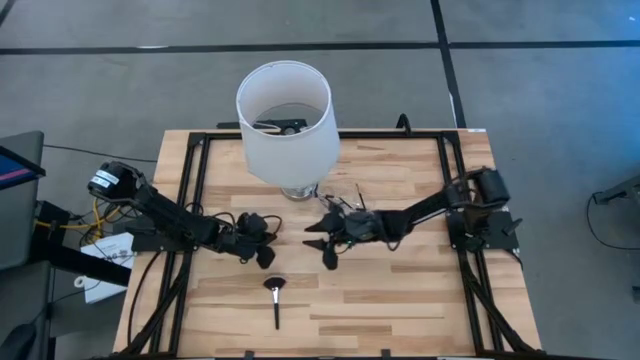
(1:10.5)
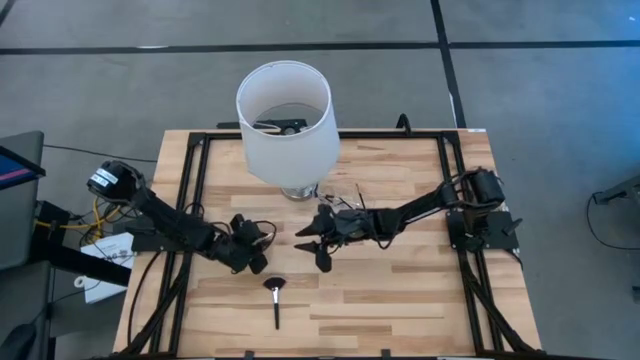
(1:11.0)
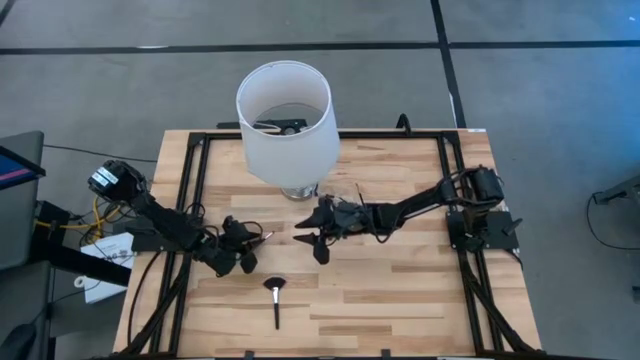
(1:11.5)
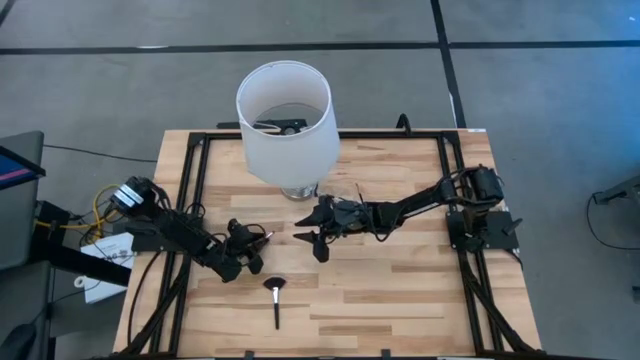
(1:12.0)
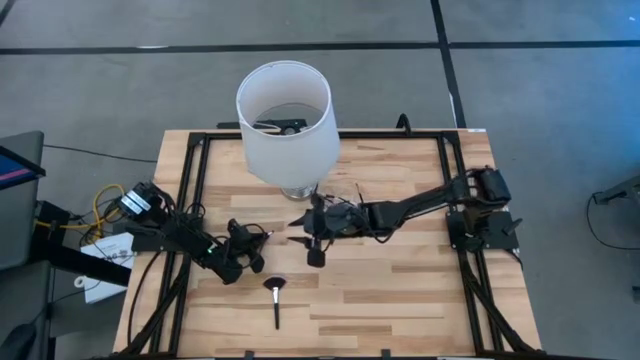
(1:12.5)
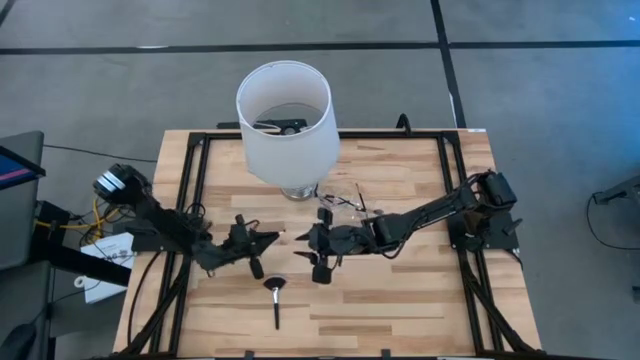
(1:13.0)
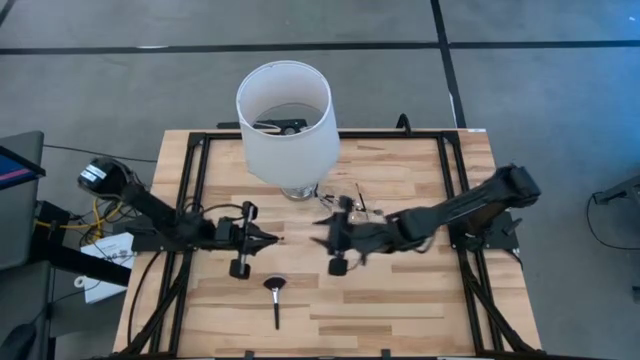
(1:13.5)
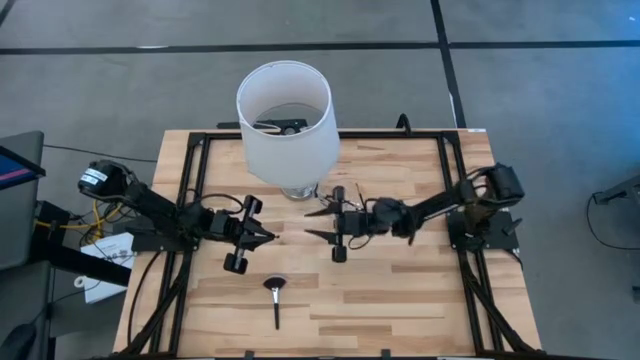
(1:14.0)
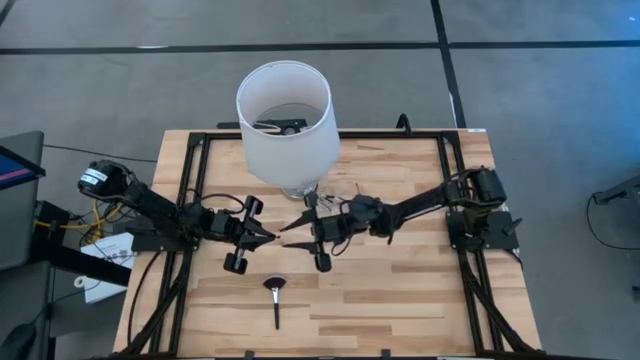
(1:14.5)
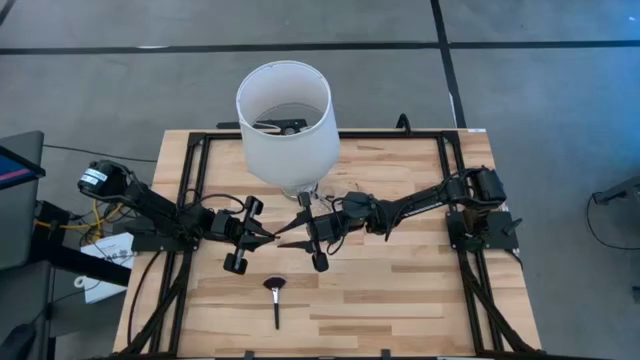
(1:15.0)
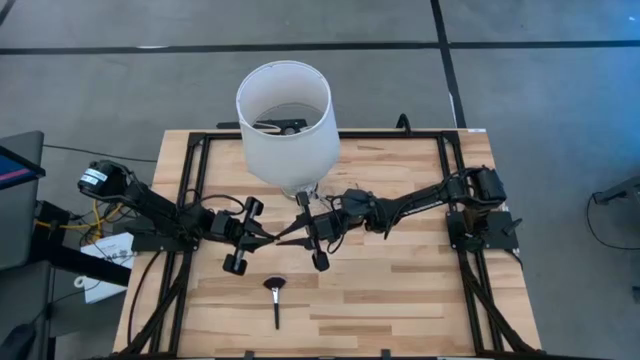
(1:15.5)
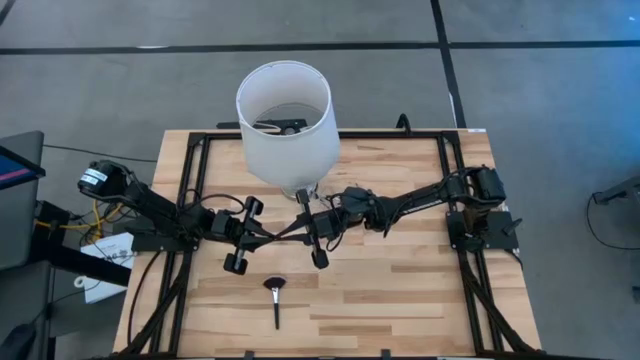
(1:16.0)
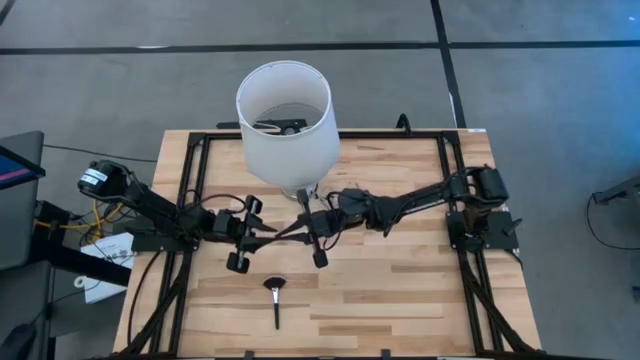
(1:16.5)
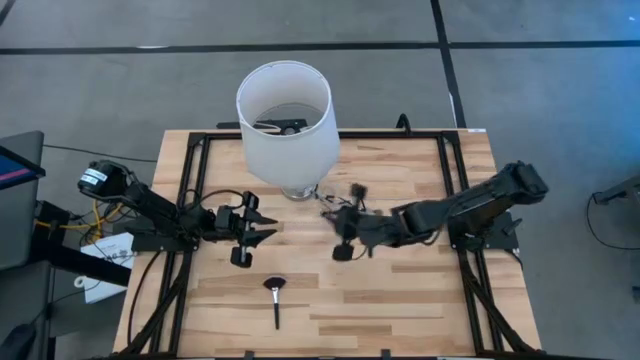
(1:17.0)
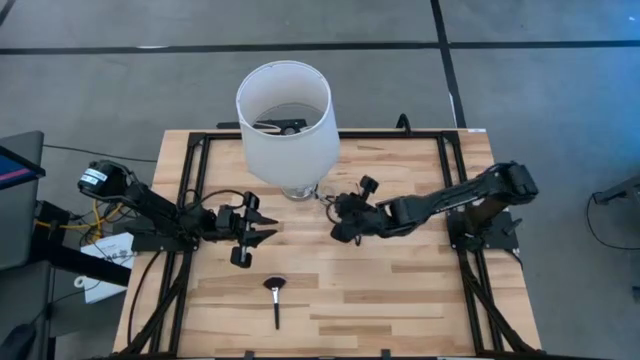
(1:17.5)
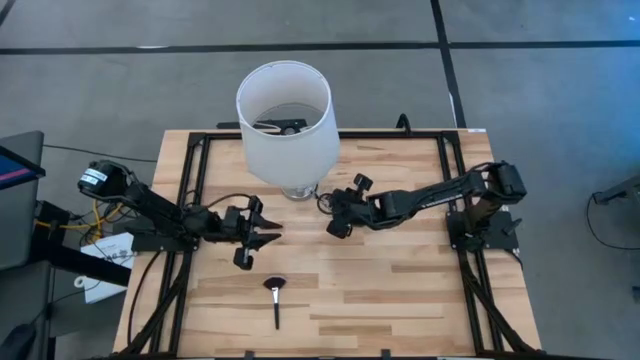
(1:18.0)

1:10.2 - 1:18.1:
Task: Put items in baskets/containers
Put the black eyeshadow brush into the transparent organizer

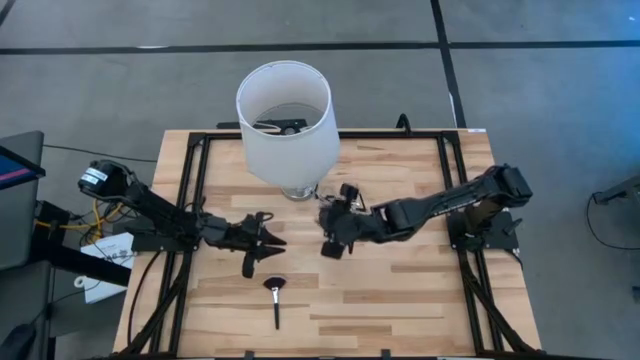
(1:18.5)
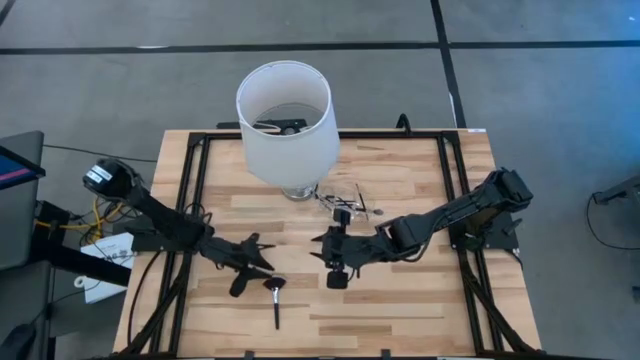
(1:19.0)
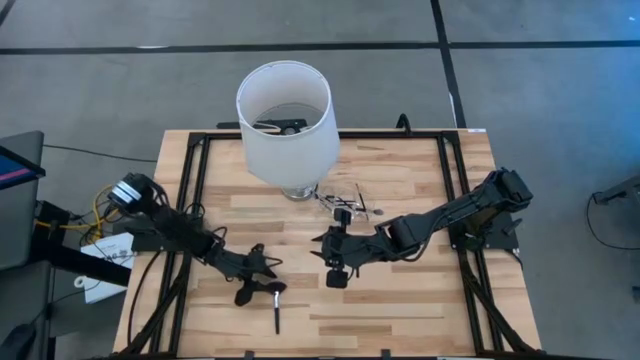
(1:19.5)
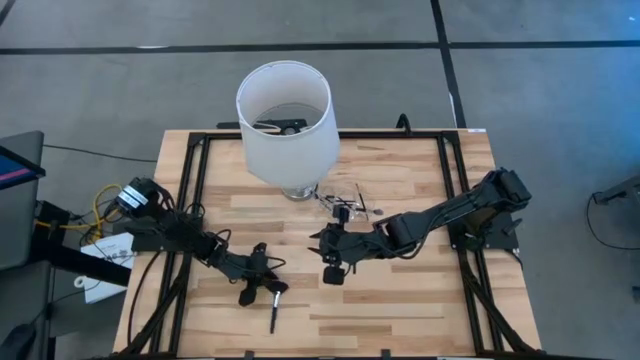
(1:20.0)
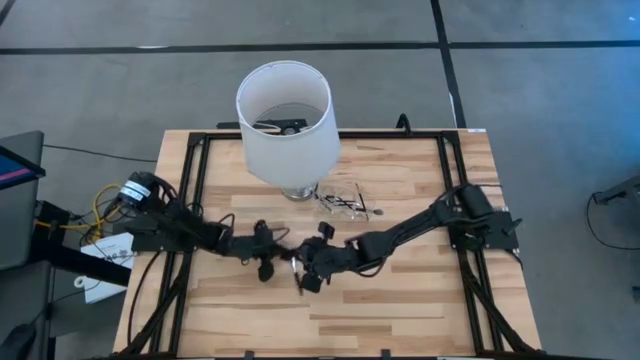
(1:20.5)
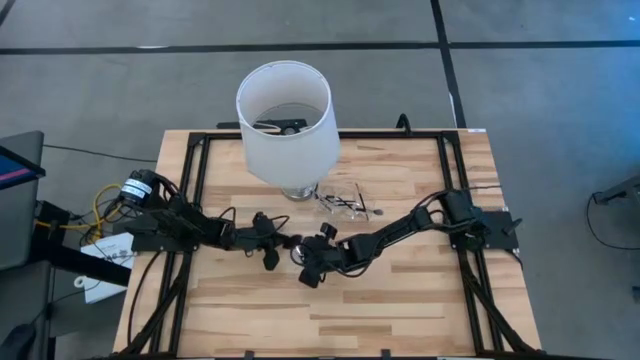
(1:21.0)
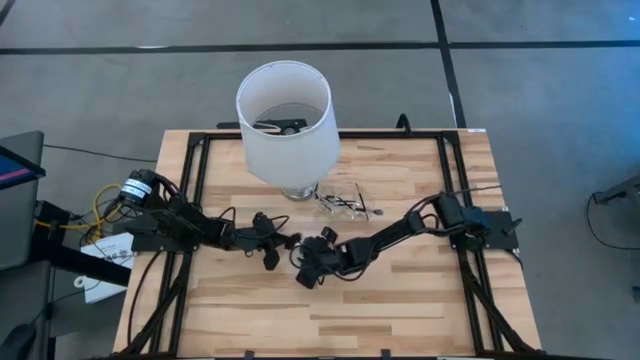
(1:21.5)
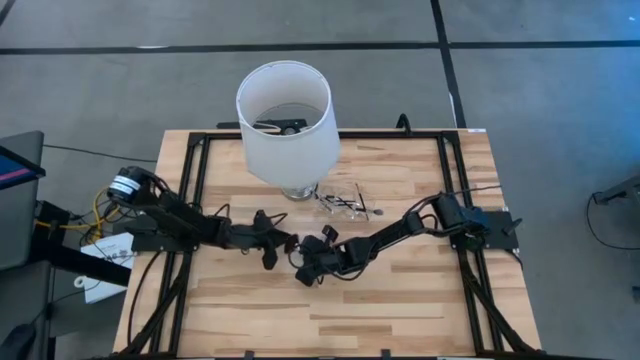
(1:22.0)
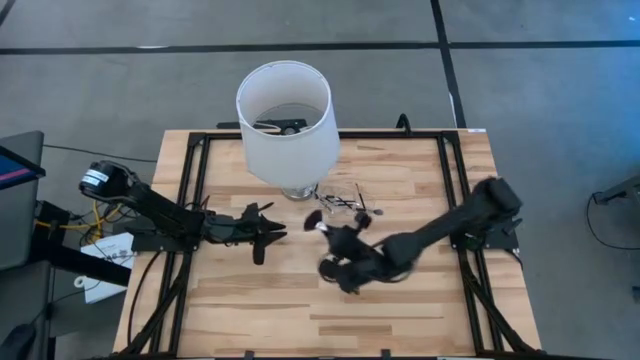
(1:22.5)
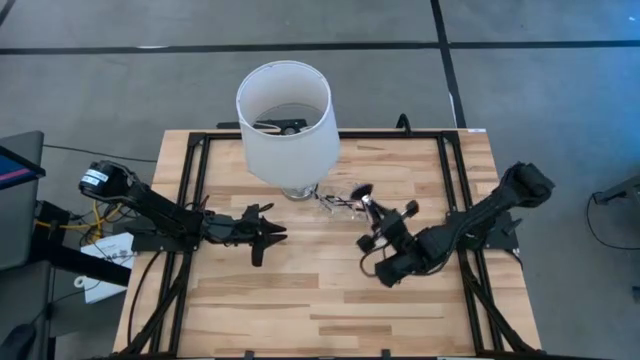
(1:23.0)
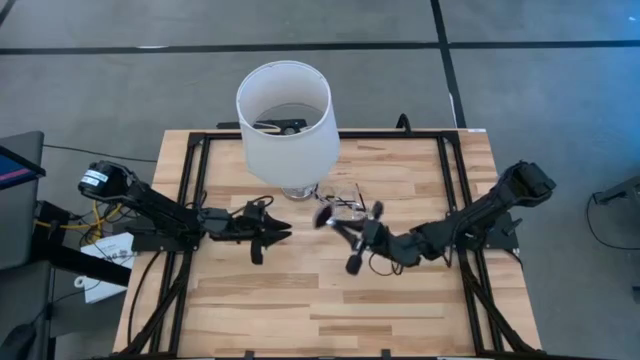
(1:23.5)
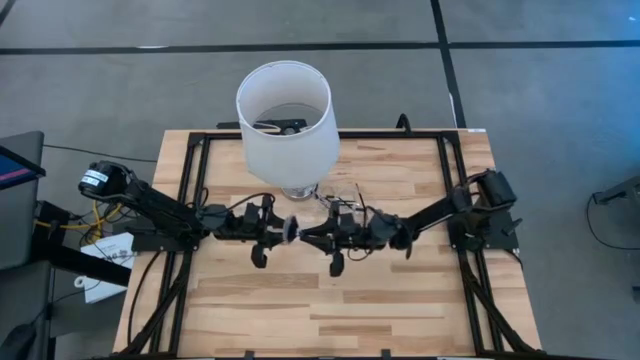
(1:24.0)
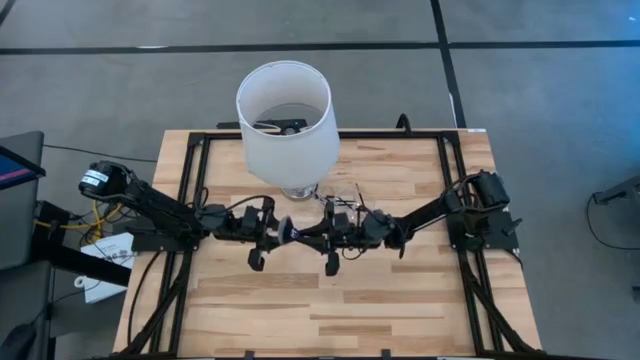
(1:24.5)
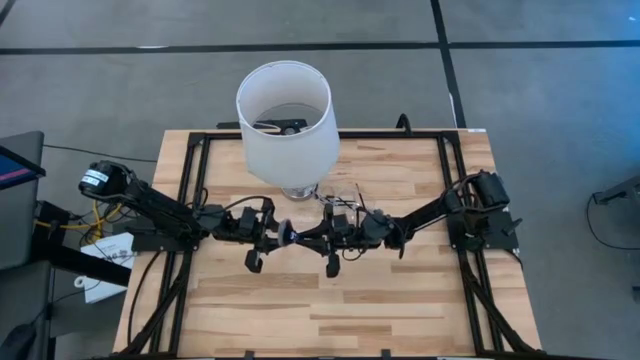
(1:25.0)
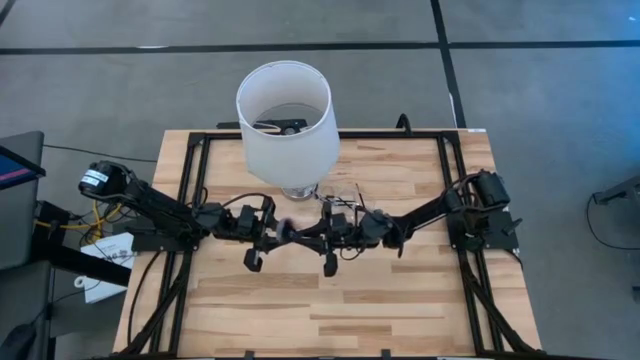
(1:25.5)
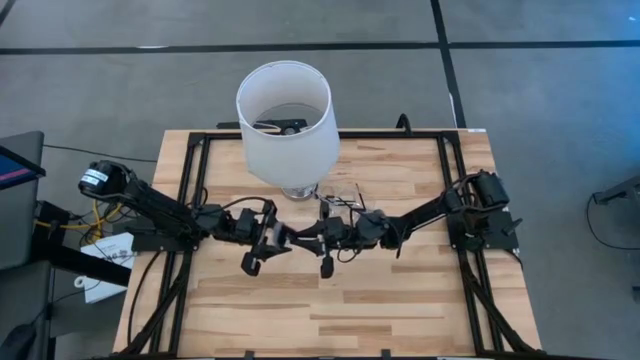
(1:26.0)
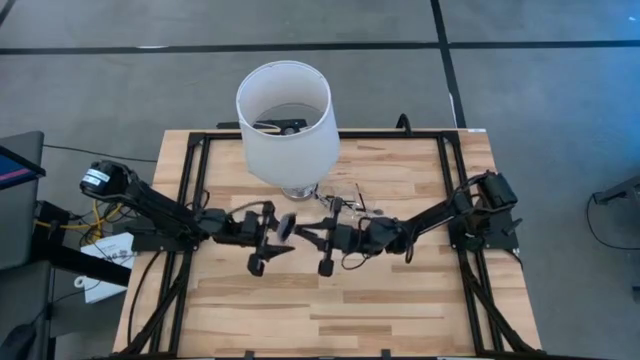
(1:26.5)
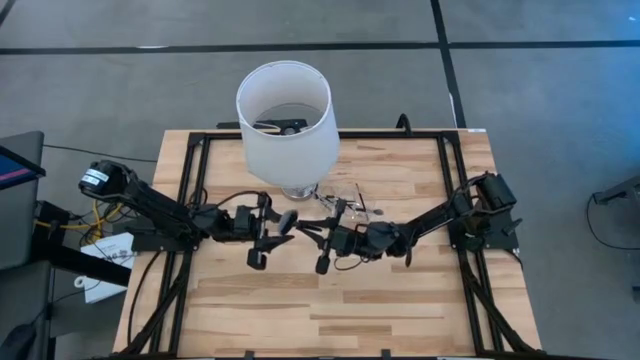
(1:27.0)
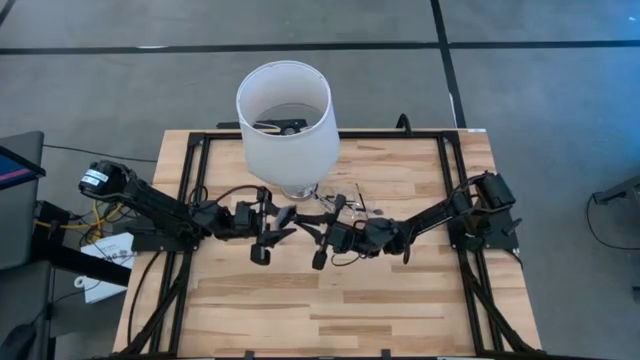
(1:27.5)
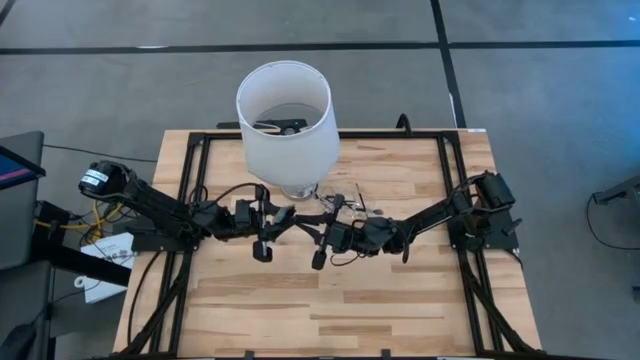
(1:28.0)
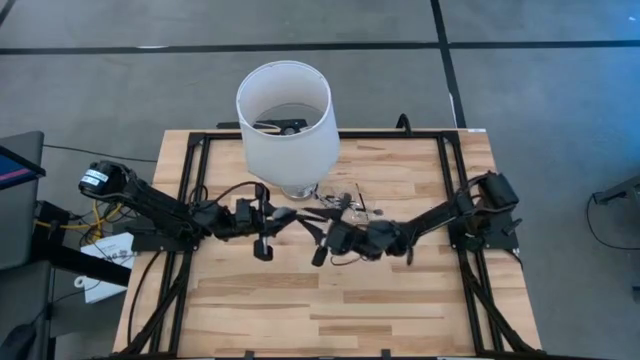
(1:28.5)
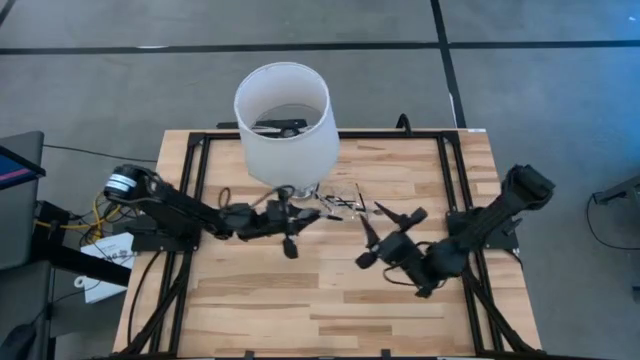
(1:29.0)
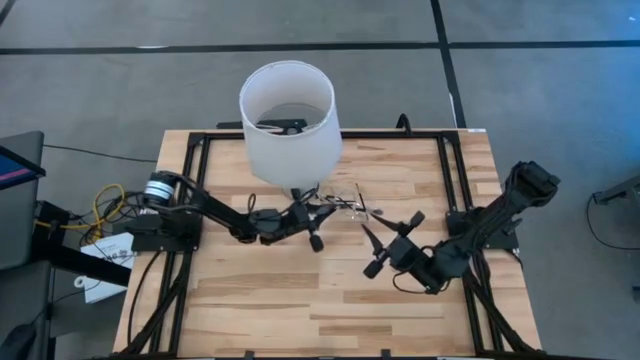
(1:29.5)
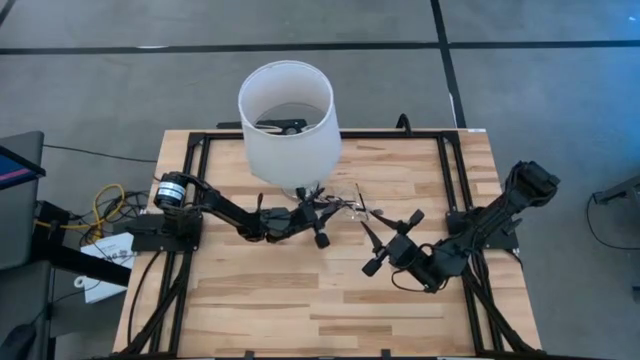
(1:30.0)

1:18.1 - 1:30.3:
Put the black highlighter brush into the transparent organizer

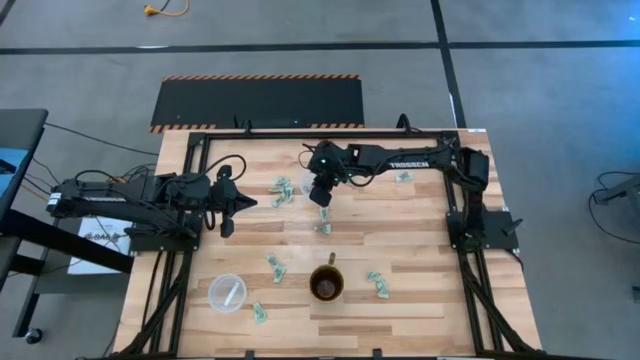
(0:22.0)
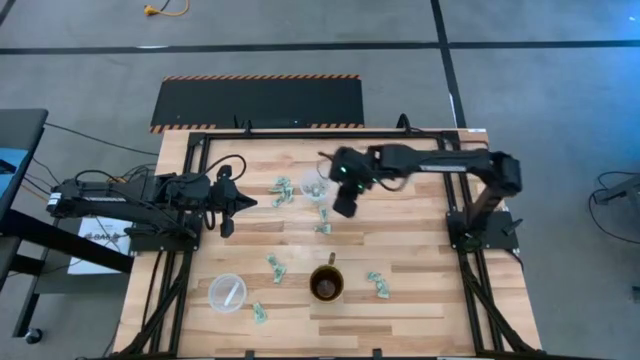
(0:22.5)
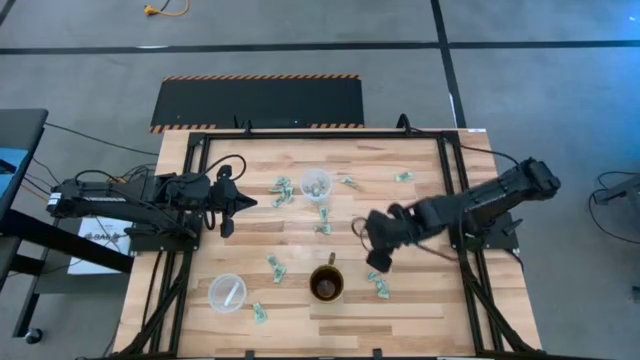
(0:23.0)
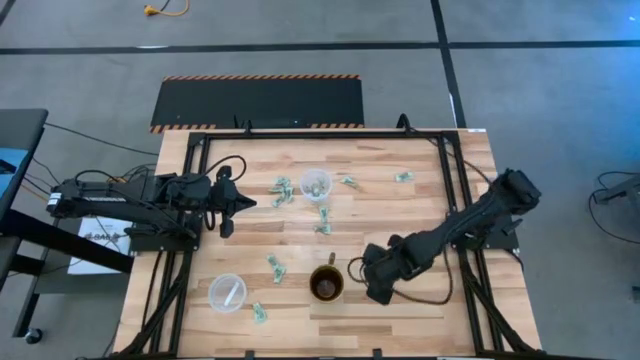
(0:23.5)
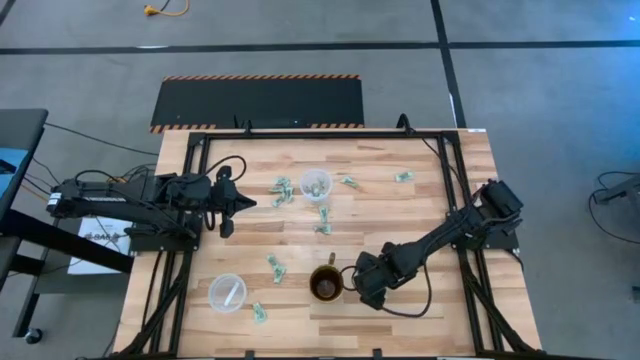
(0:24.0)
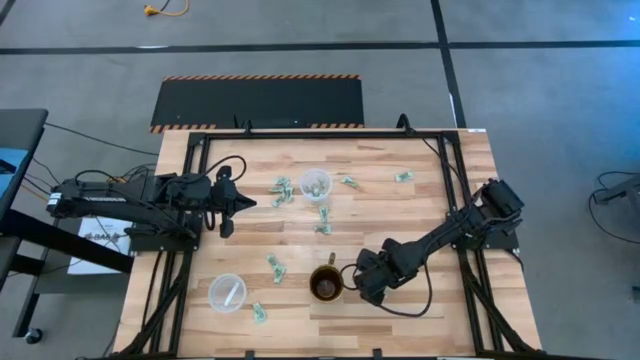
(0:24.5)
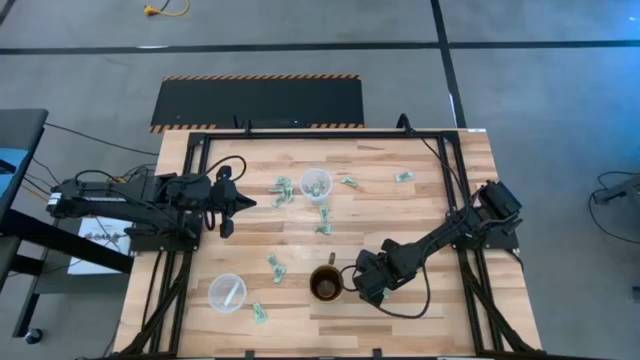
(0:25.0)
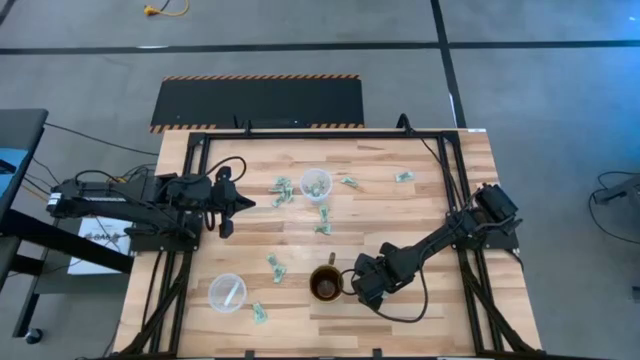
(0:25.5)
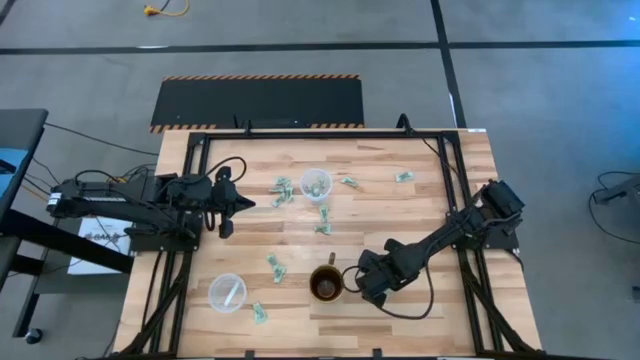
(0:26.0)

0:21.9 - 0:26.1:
Task: Pick and place items into bin
Put the stevia packet into the top transparent bin
